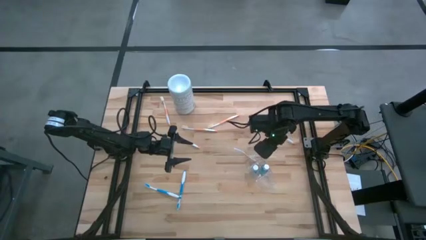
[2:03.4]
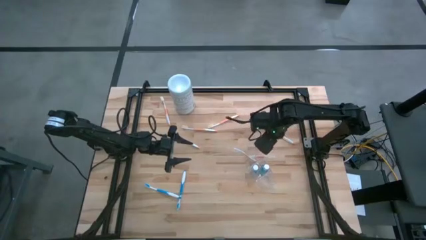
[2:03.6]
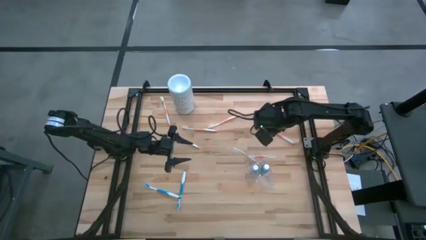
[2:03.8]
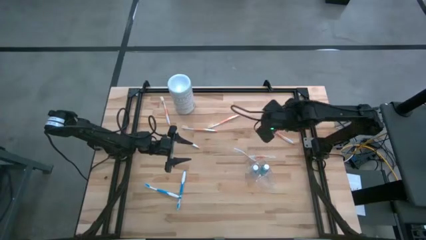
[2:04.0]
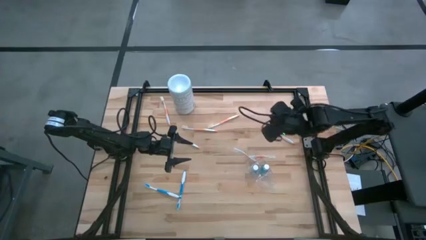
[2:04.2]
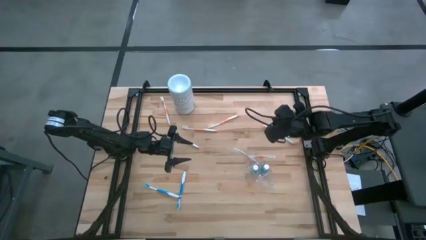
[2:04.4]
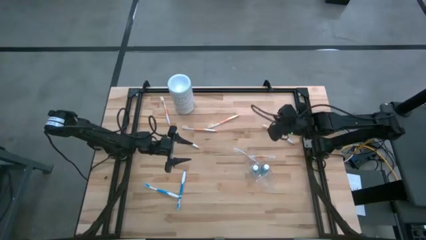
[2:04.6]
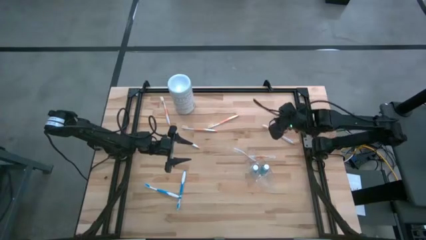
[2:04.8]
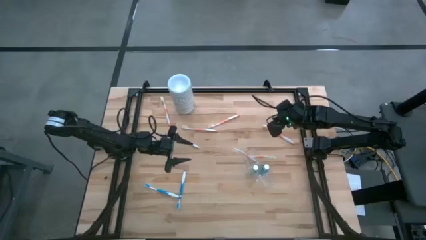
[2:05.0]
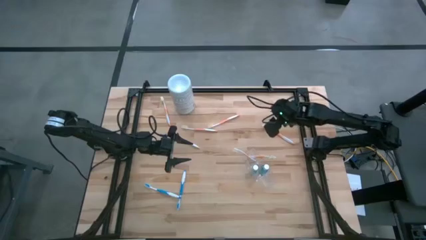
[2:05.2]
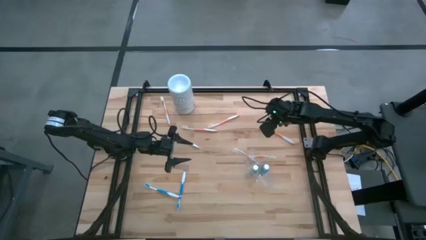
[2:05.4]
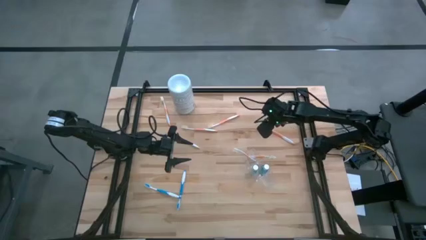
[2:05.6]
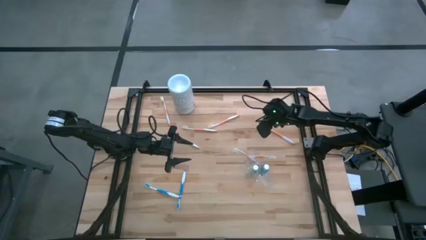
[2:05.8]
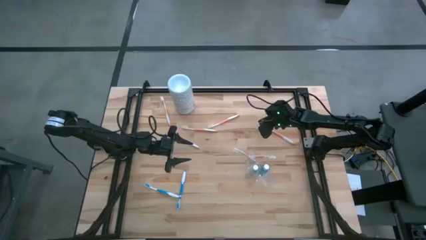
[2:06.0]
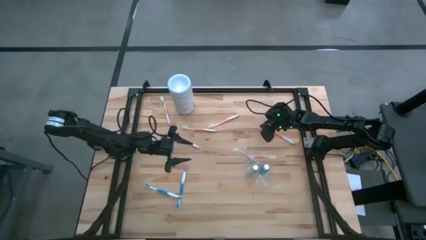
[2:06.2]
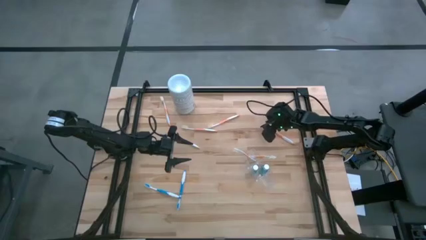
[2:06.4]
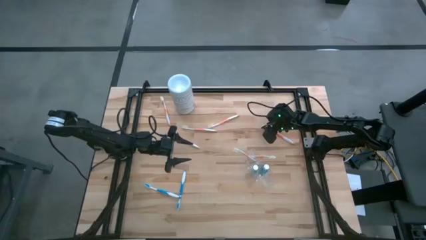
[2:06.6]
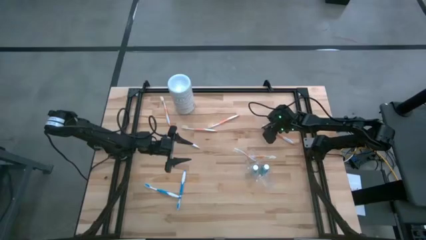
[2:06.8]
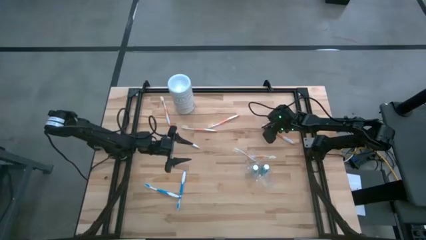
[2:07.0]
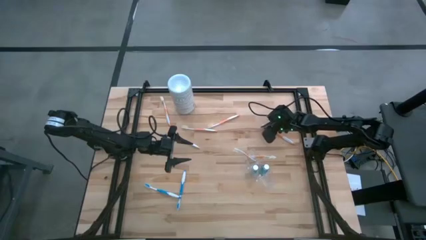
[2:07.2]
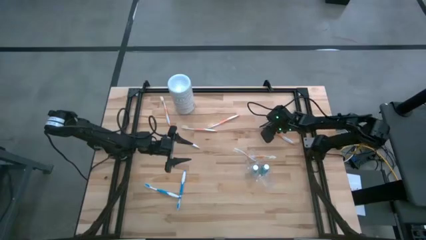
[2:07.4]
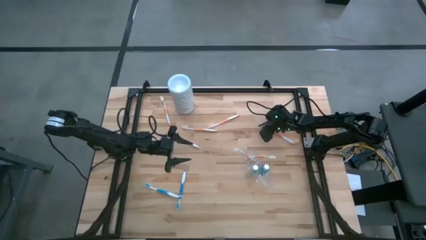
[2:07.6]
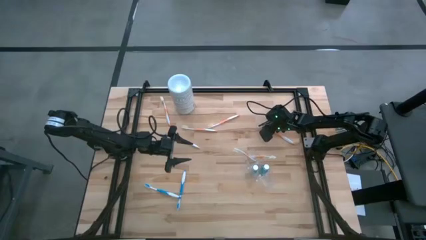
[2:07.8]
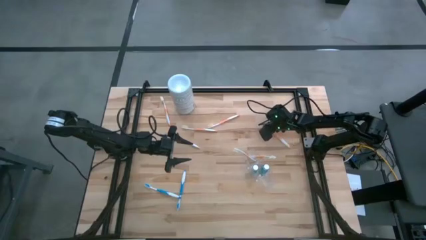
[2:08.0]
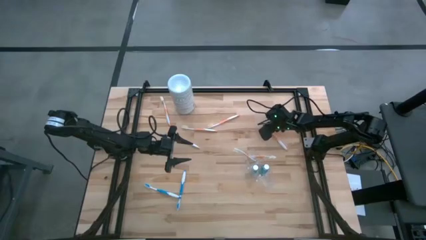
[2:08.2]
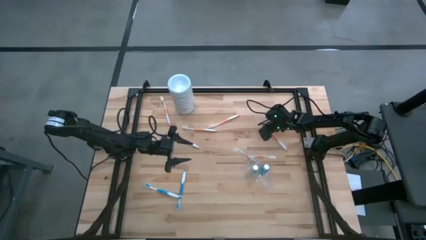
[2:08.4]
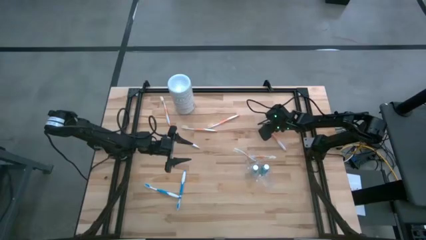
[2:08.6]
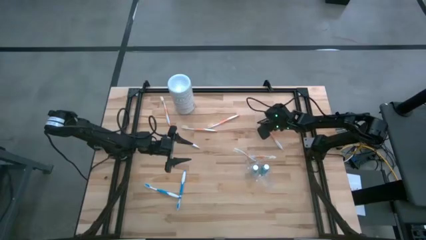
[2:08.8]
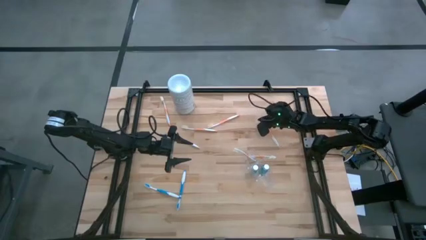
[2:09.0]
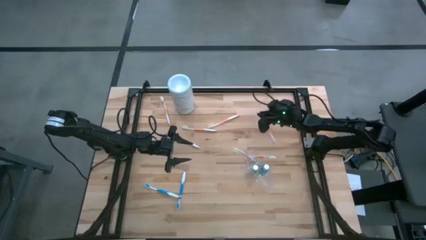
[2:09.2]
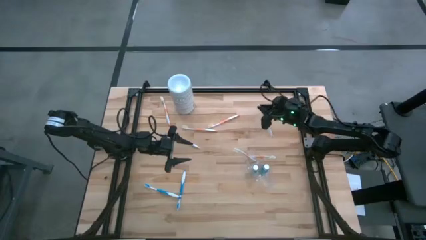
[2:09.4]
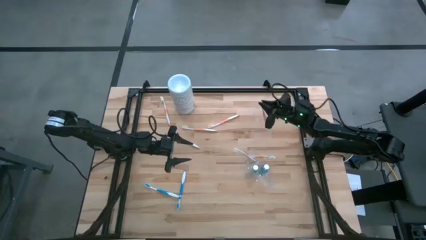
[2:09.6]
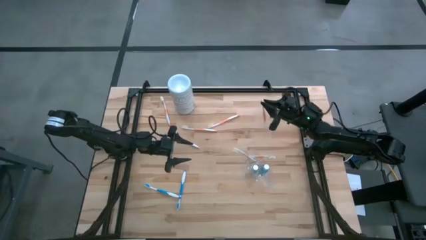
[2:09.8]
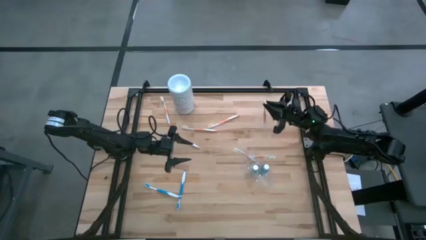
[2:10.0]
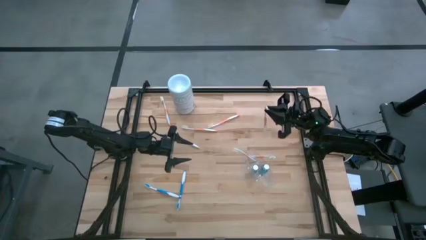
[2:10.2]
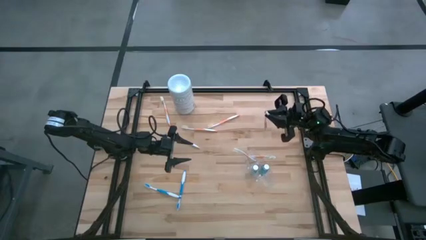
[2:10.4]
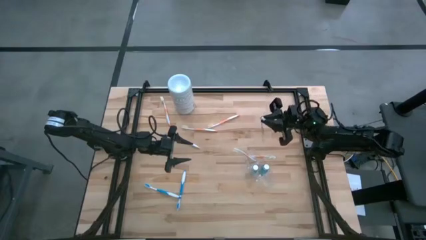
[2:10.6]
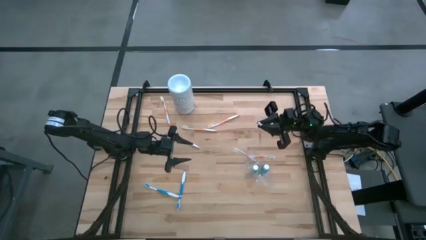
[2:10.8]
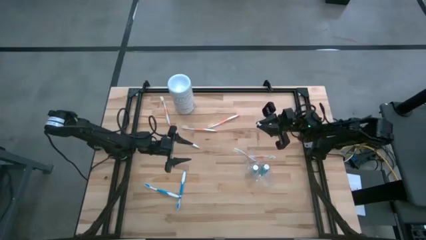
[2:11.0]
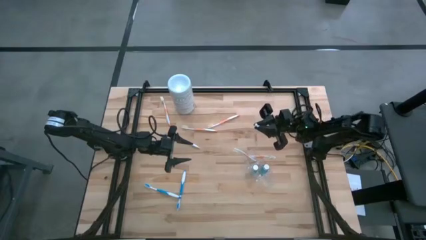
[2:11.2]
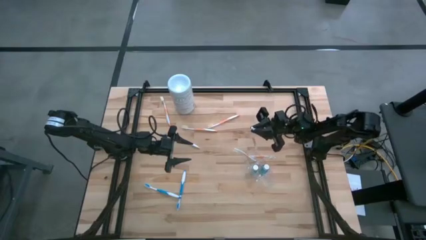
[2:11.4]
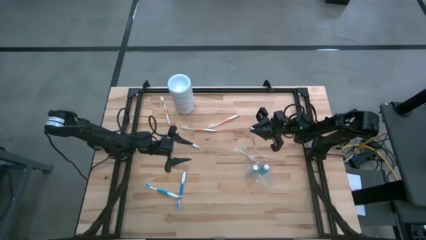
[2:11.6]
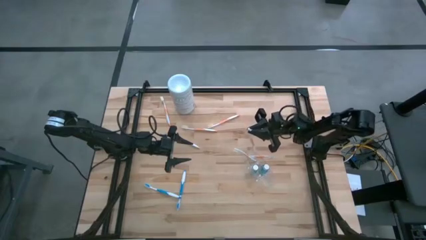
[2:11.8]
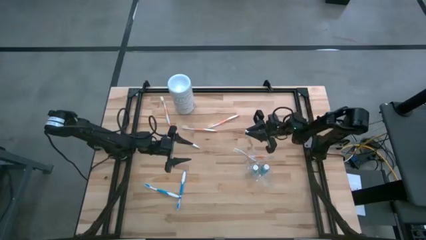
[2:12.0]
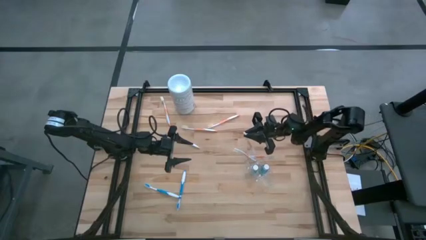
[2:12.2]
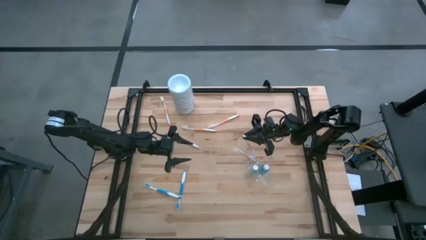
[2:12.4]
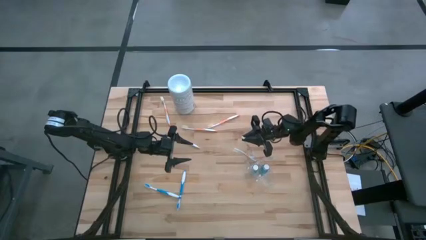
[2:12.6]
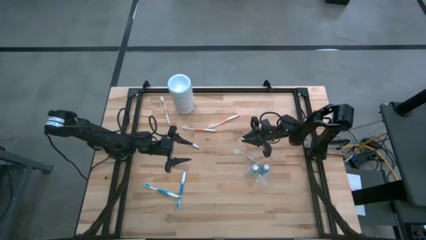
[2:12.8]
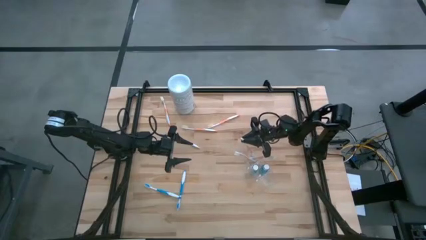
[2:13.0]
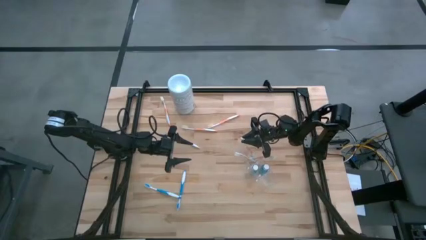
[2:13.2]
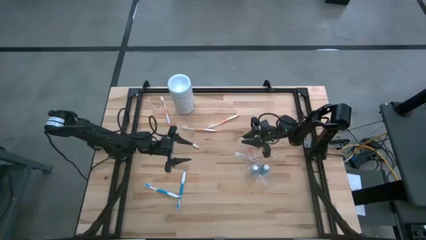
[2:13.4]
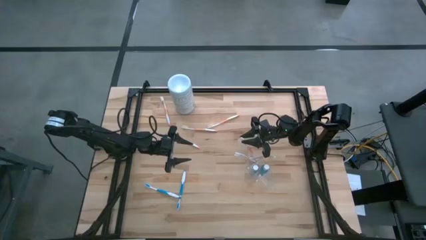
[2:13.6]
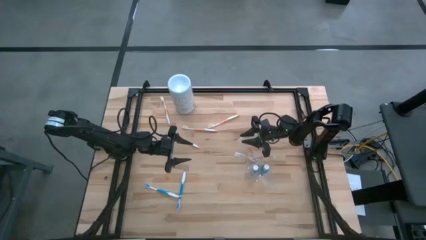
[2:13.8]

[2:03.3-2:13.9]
Task: Pick & Place toothbrushing station
Put the orange toothbrush into the top section of the transparent organizer

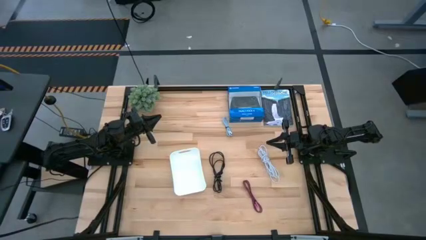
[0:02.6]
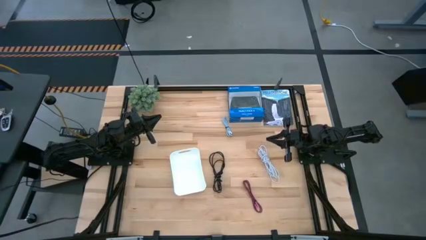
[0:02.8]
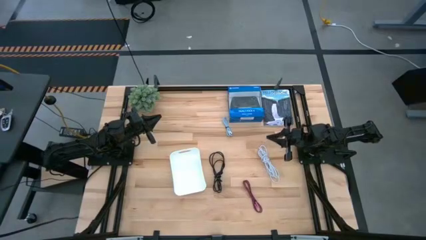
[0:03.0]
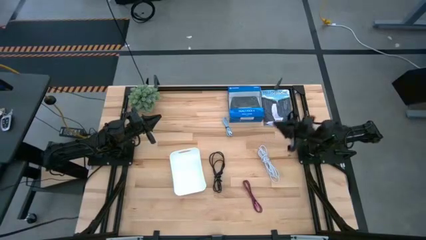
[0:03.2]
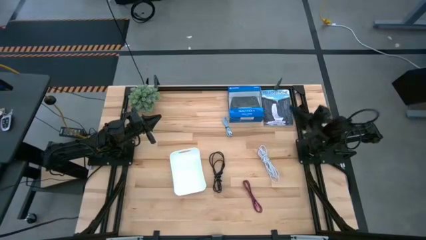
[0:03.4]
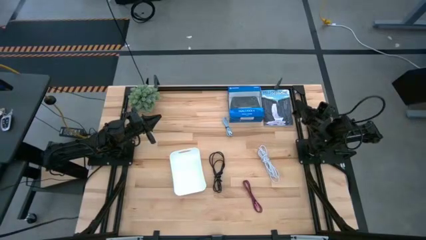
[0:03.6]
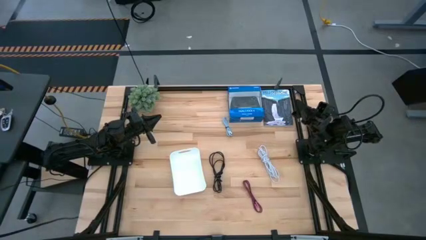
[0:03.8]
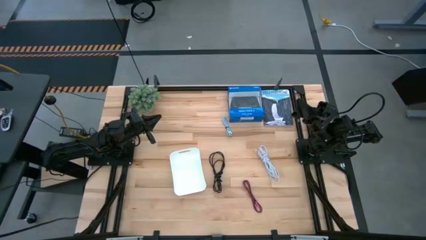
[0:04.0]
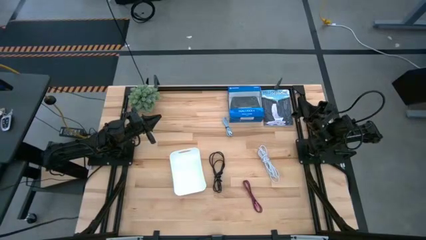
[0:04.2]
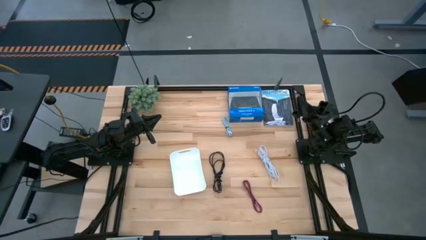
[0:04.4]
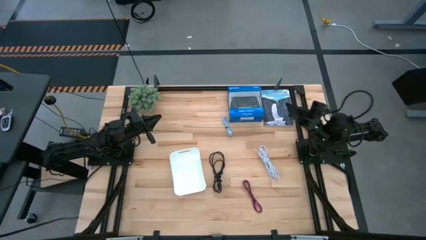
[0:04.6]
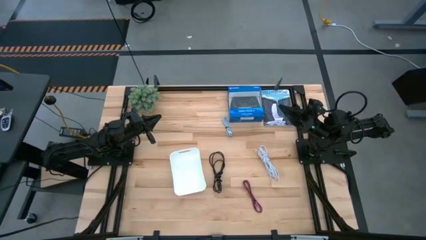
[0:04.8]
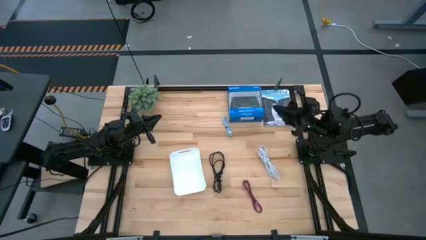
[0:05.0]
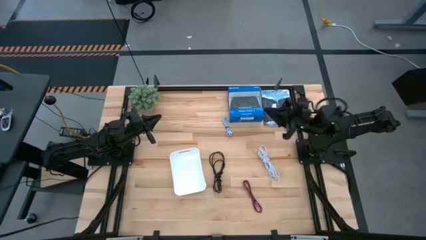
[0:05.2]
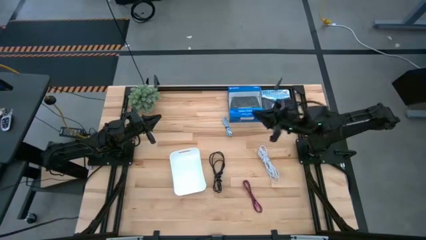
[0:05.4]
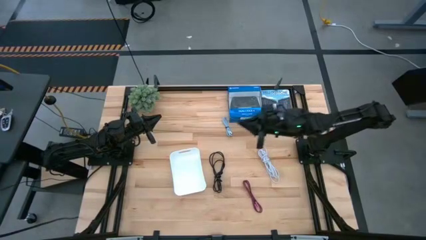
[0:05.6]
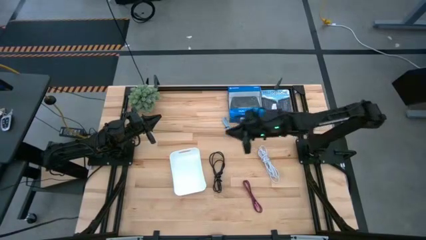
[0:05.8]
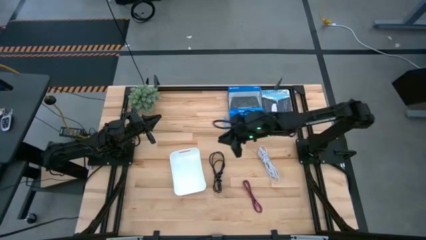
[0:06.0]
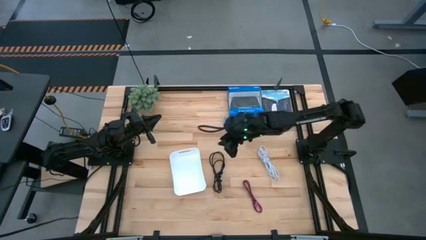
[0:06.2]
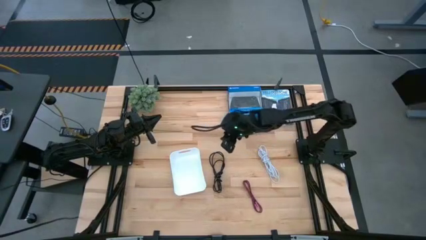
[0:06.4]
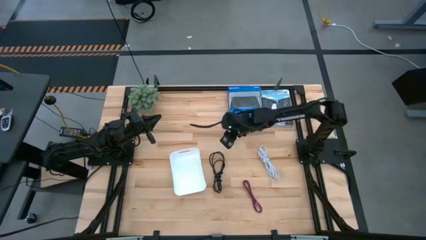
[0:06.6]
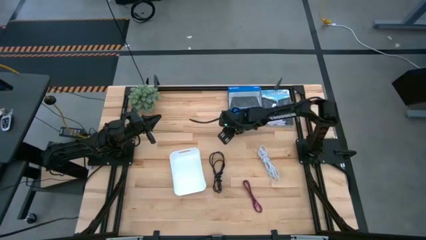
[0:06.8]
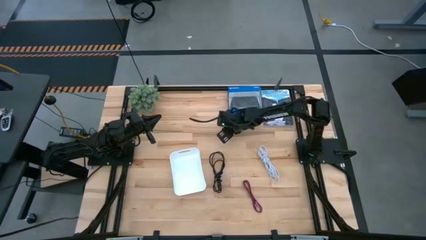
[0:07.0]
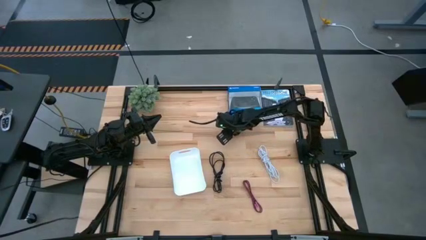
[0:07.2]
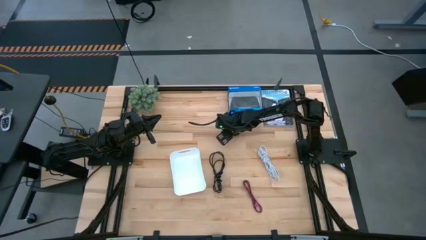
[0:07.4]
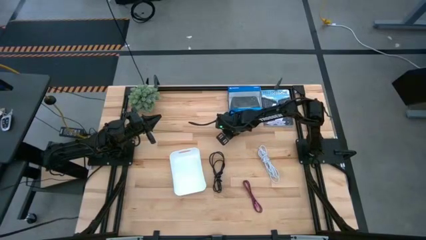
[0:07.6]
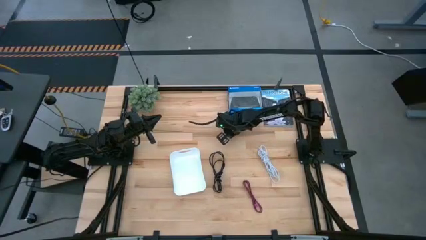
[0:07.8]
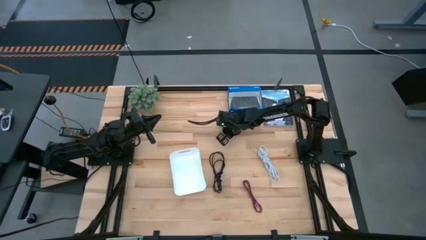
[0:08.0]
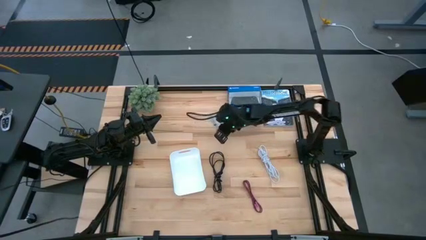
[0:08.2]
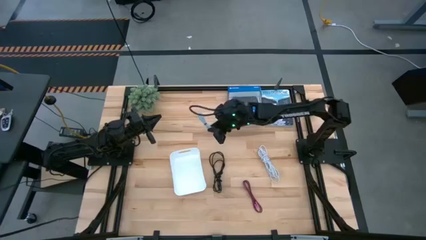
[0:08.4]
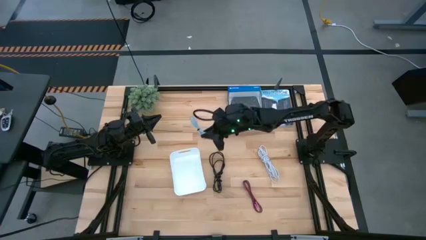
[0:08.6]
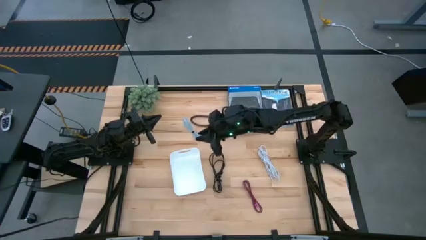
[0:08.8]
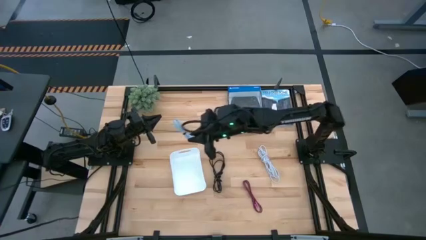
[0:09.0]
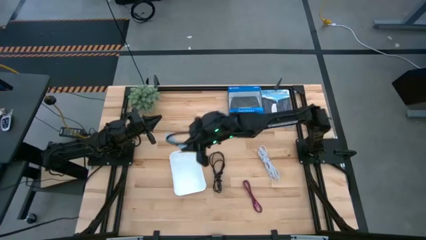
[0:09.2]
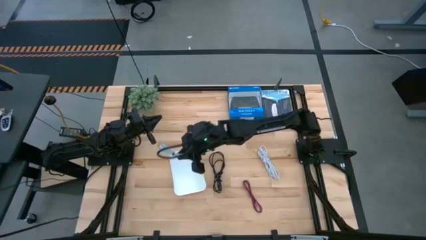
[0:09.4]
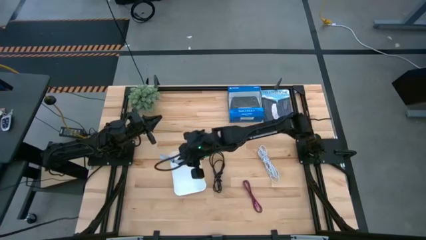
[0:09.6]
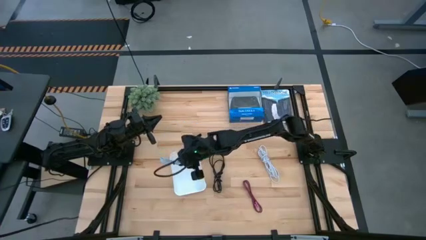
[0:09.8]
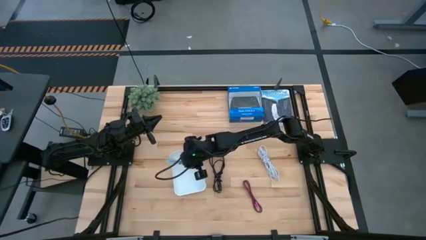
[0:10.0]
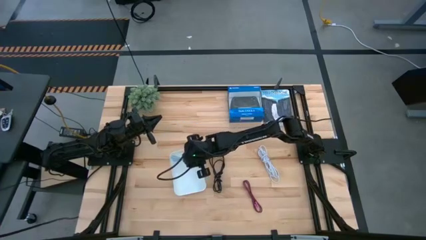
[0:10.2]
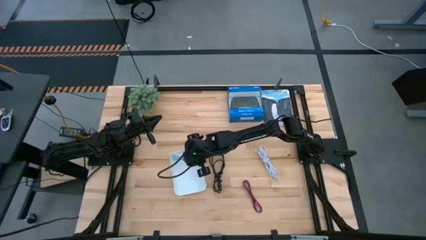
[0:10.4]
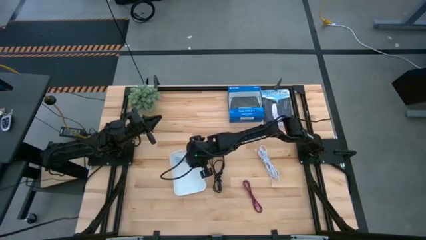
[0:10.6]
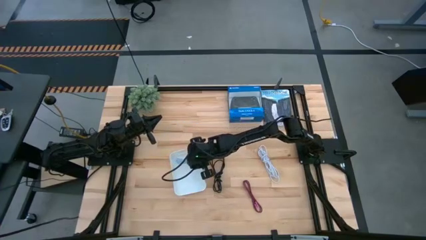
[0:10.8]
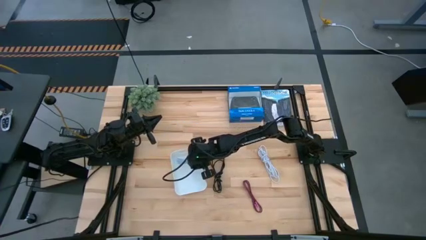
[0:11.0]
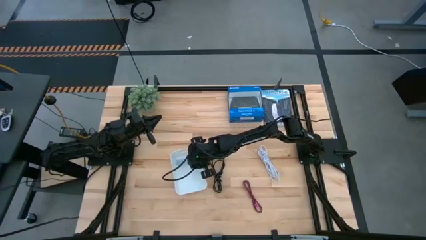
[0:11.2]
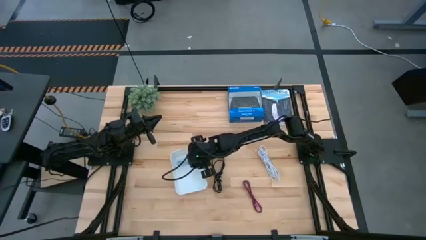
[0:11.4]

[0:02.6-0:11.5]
Task: Pick and place USB-C Cables
Put the blue charger cable into the white bin
